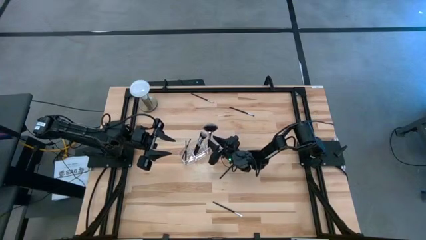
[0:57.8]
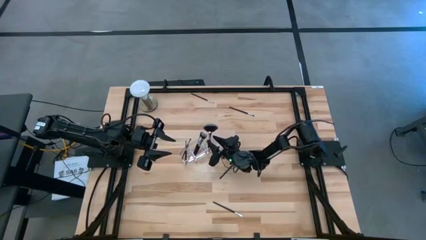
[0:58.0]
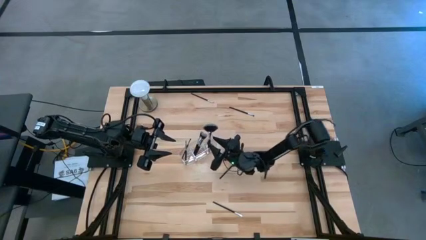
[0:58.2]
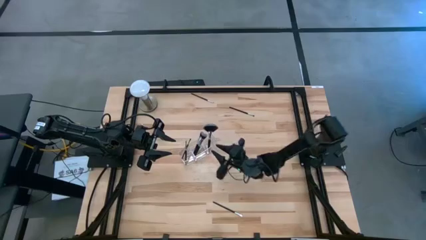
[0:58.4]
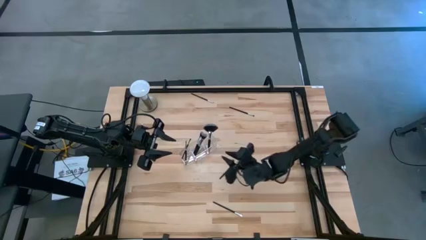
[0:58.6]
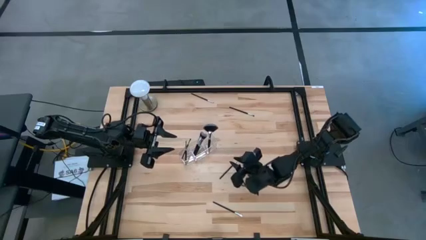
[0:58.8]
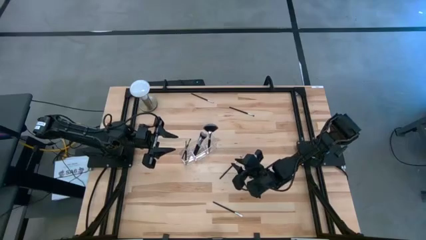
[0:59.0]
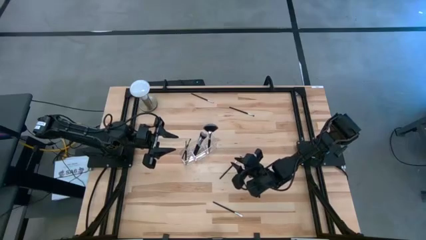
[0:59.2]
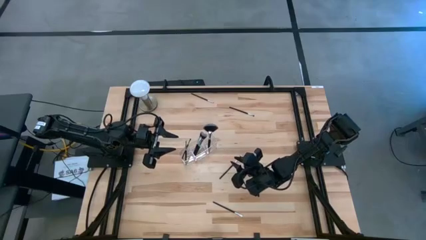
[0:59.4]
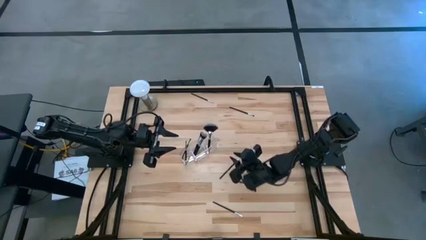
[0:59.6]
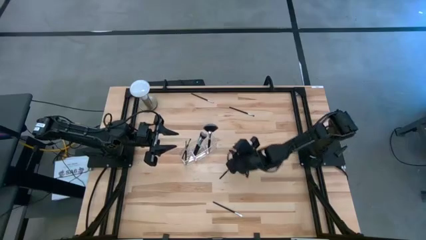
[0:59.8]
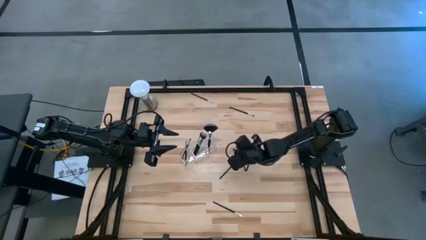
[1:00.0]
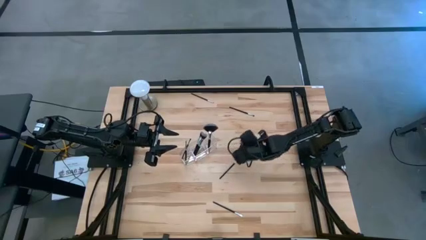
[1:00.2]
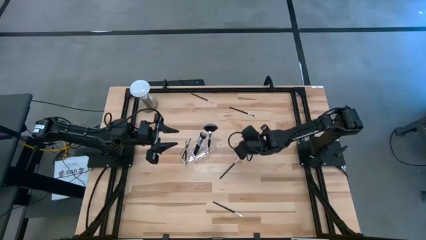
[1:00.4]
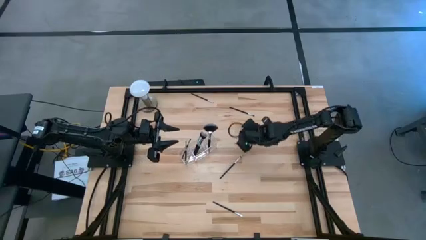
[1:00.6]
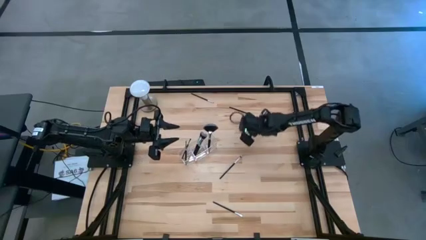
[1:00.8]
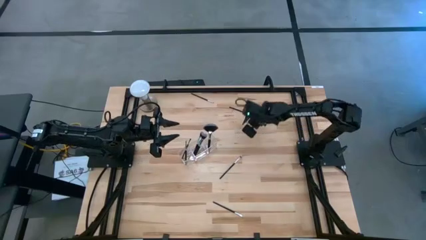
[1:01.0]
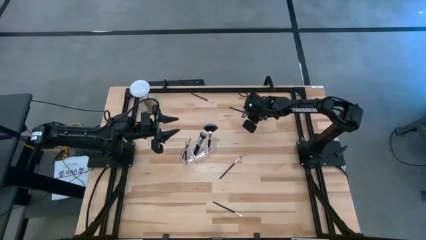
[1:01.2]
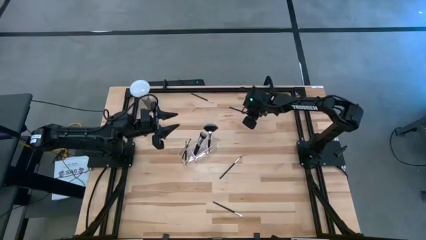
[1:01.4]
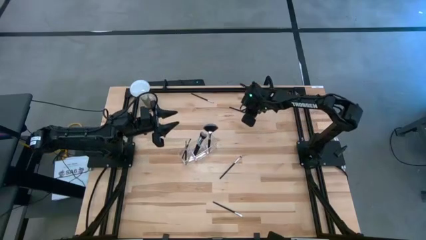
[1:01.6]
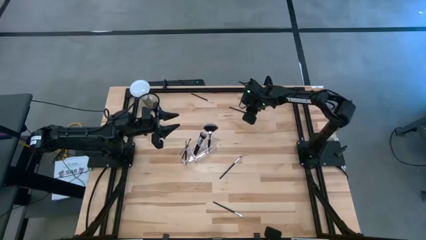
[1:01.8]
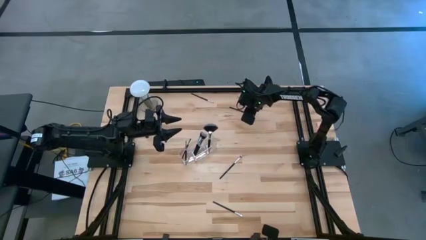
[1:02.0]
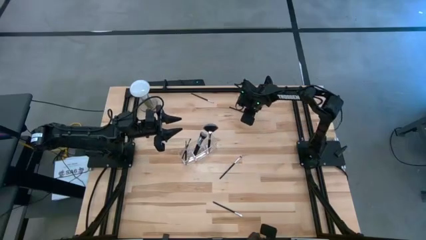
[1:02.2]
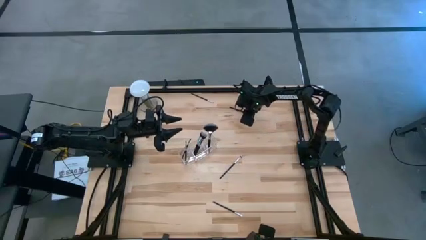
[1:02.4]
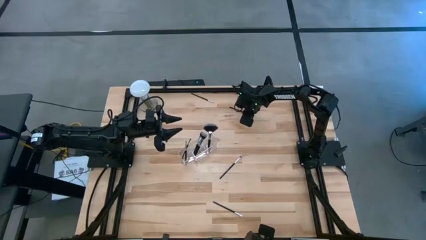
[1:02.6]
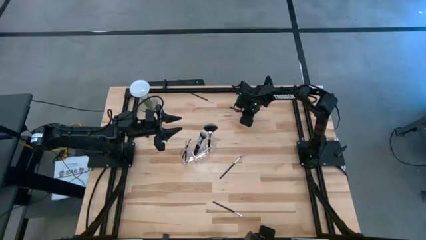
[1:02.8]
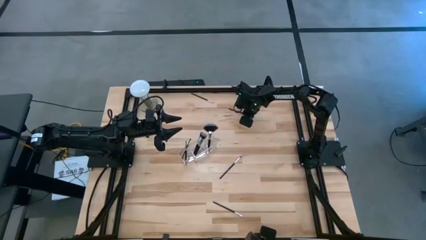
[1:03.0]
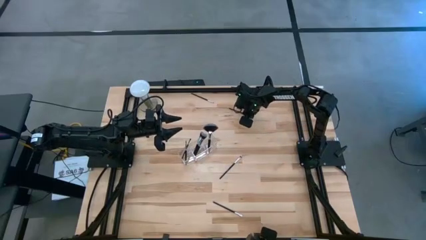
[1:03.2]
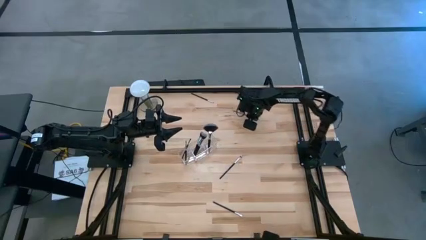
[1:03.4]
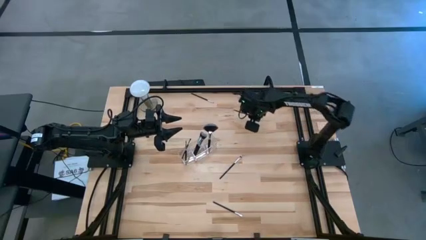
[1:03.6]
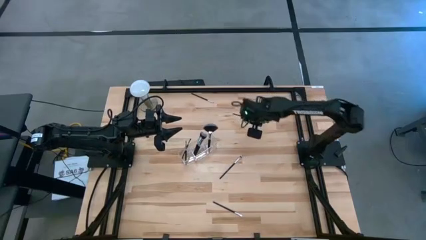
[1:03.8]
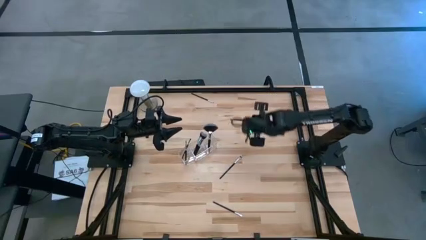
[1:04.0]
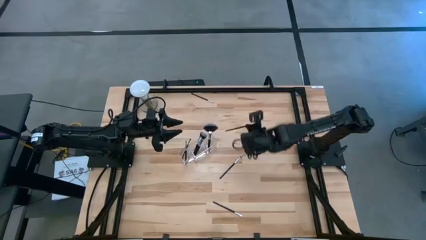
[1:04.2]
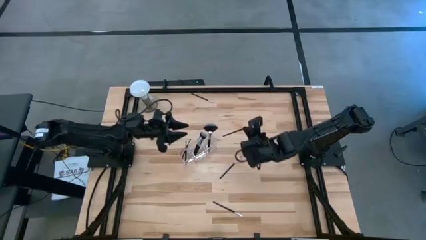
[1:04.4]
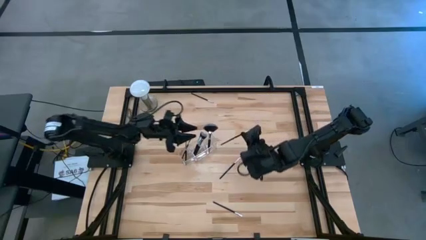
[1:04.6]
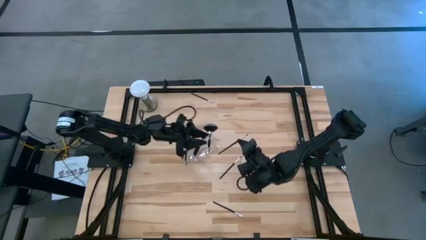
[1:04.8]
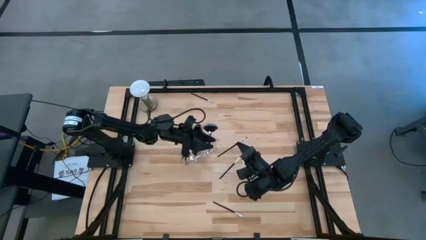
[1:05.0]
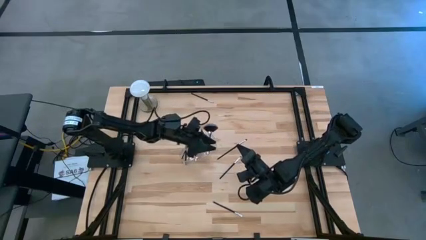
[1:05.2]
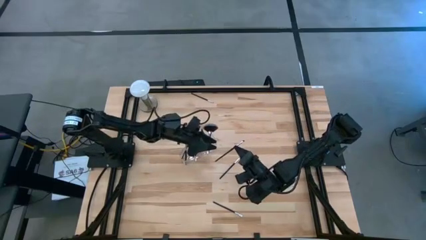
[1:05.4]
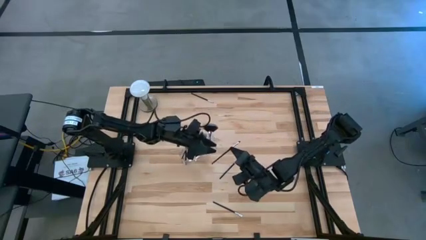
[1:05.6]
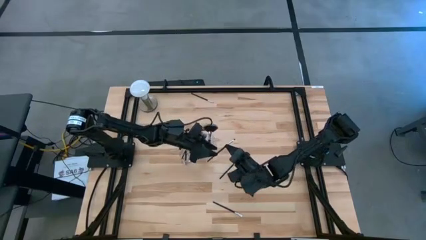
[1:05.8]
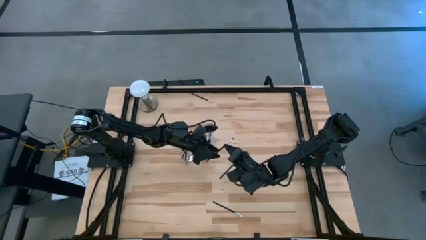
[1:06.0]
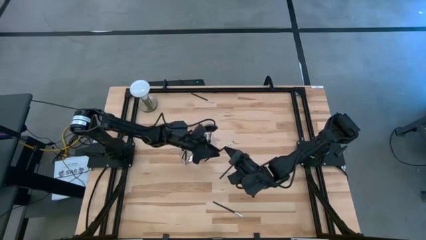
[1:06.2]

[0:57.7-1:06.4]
Task: Put items in baskets/containers
Put the black eyeshadow brush into the left section of the transparent organizer

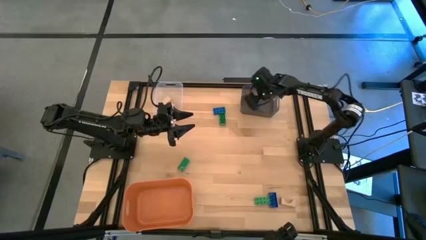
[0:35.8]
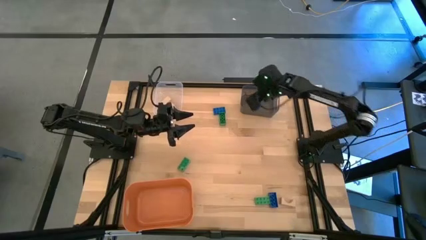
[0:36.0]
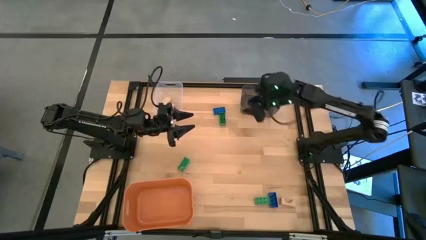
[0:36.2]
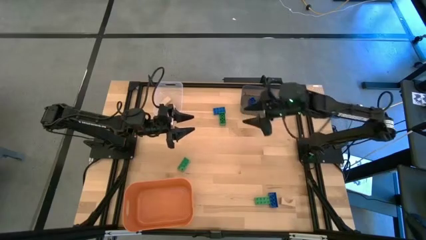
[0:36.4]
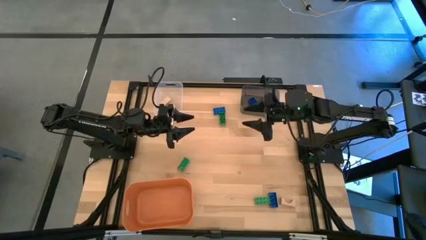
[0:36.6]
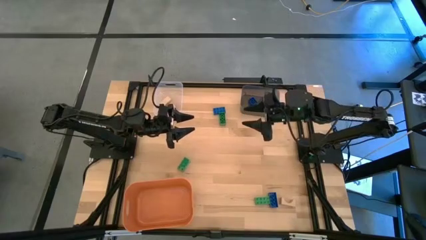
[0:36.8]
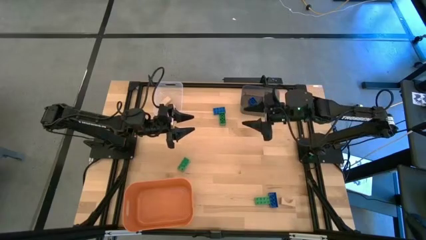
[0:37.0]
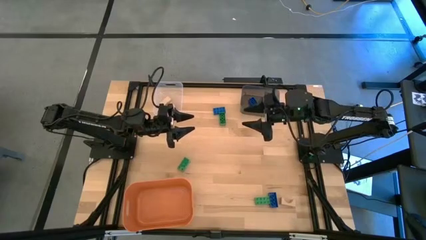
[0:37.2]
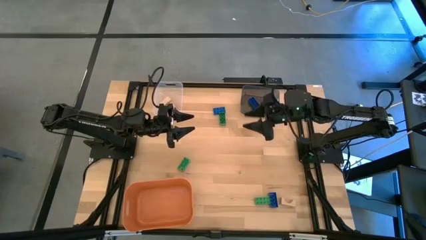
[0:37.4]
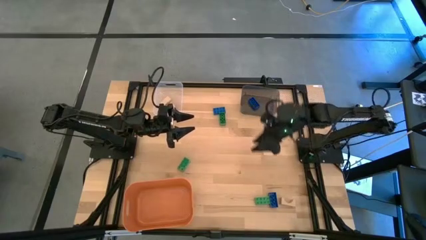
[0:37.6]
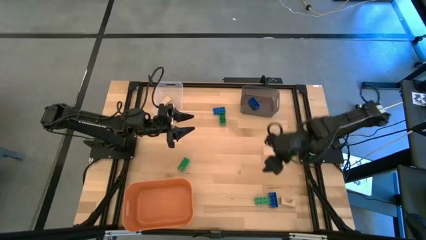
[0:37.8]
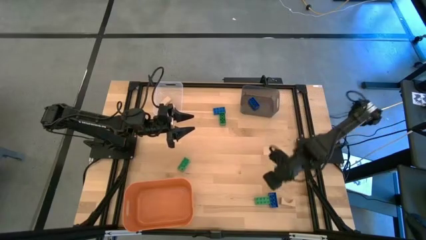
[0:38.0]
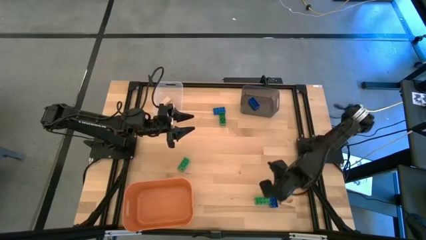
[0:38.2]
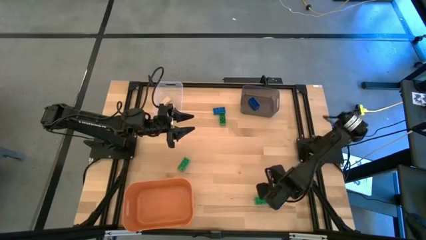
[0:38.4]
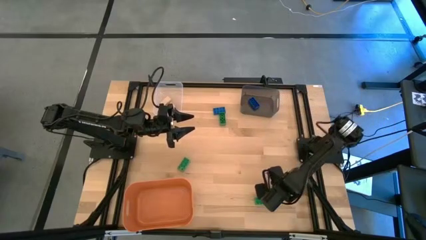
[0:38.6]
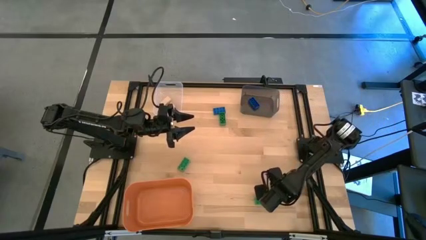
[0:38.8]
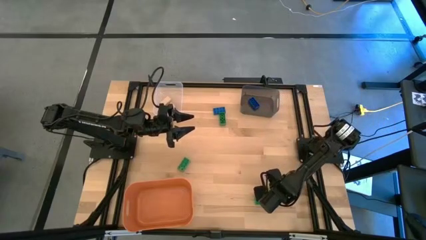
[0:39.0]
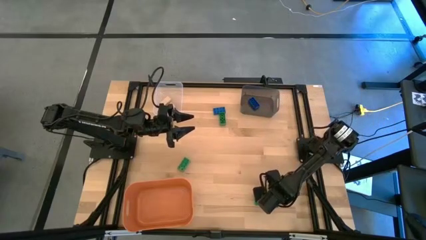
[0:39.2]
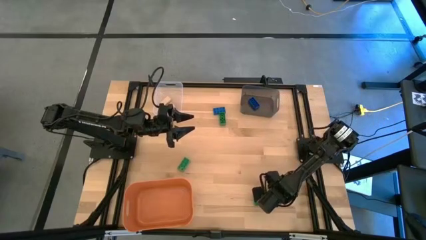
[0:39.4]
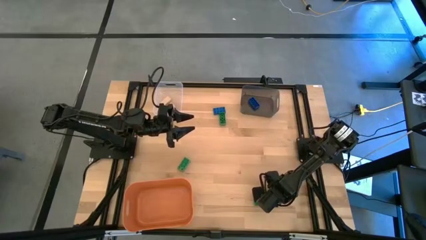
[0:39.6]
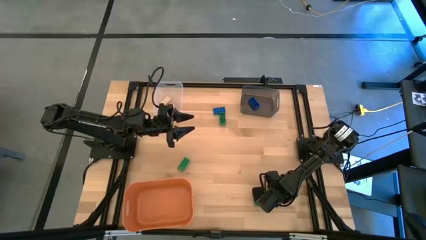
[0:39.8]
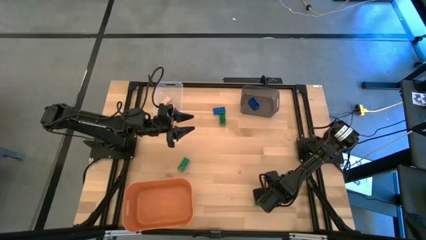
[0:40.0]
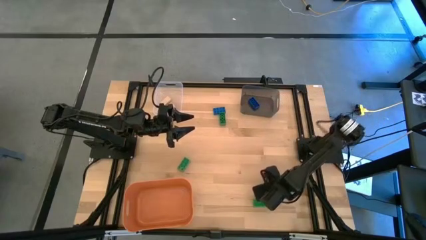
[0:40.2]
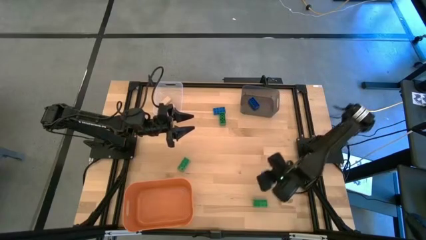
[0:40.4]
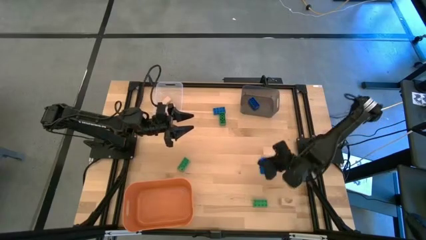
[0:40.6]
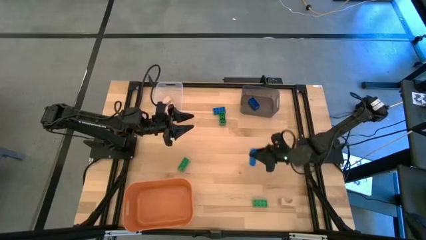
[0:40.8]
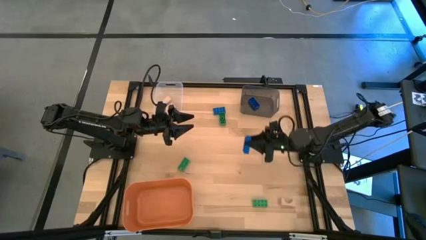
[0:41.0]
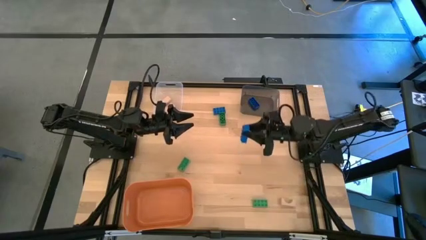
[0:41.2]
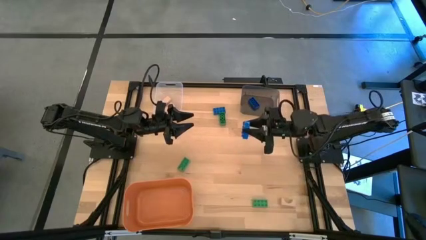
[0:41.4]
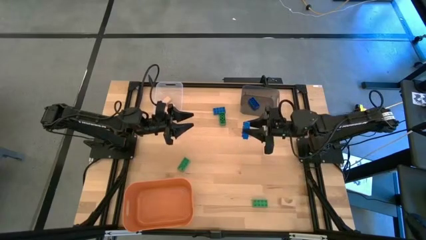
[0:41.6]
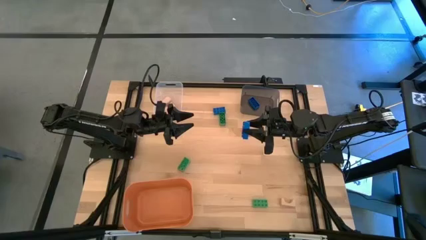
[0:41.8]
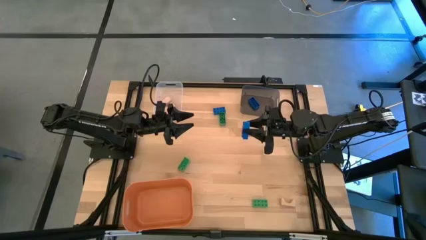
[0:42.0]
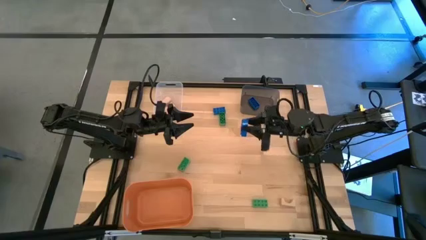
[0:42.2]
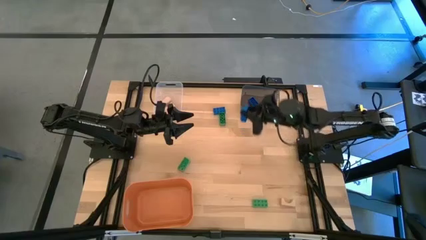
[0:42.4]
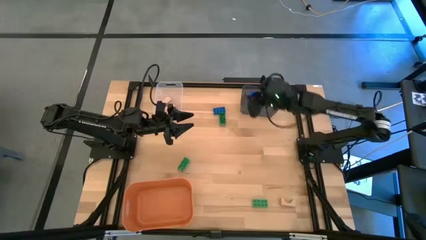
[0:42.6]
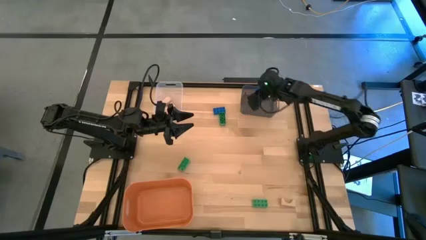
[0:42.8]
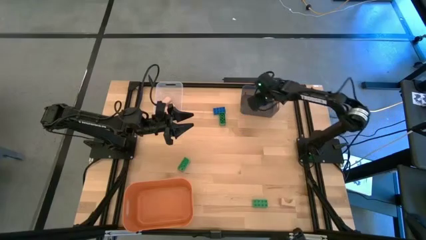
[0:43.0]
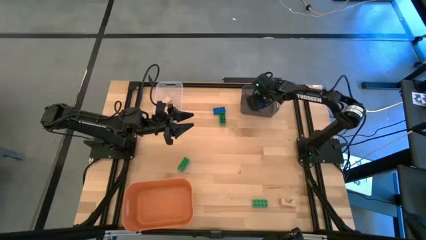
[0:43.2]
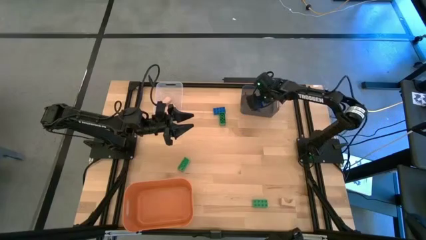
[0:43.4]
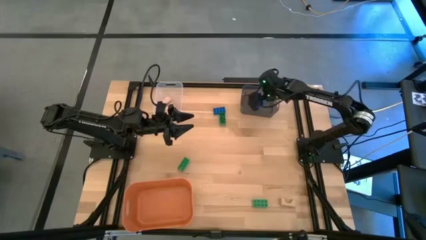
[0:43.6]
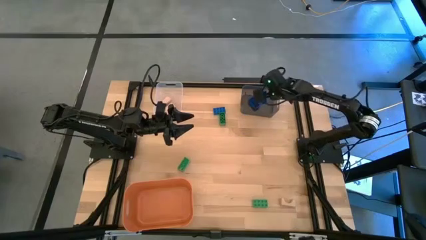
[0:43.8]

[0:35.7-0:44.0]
Task: Sort & place blocks by color
Put the bottom blue game piece into the black bin
